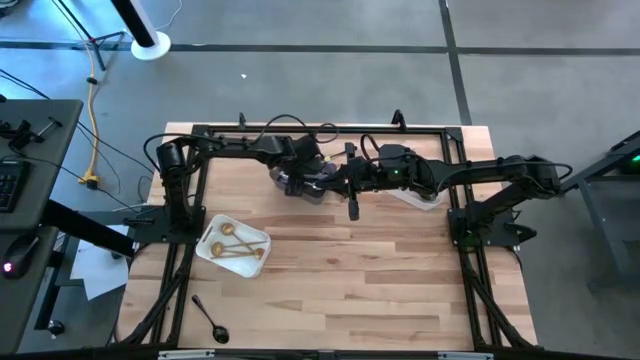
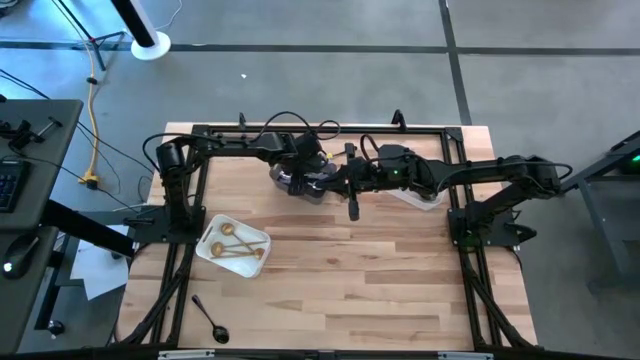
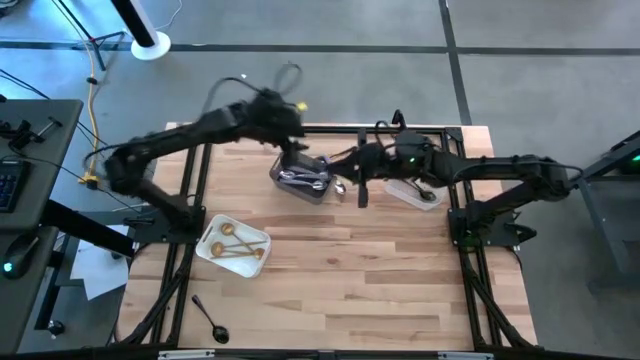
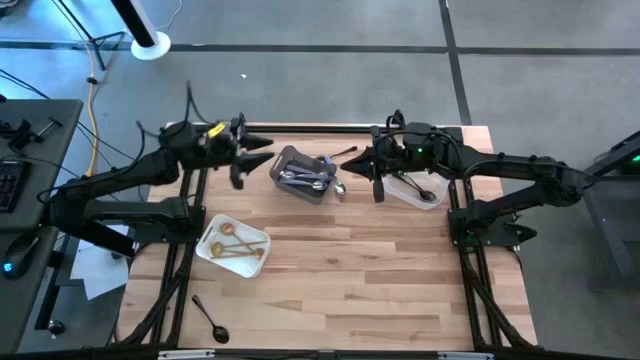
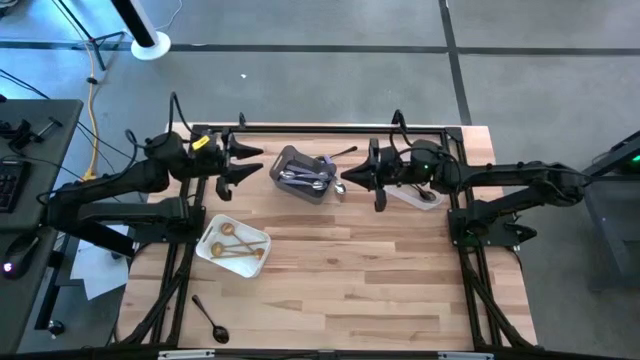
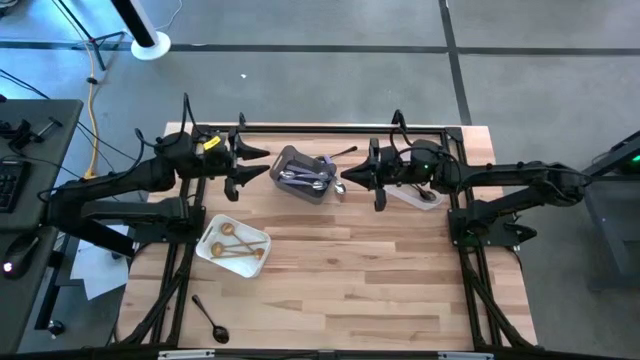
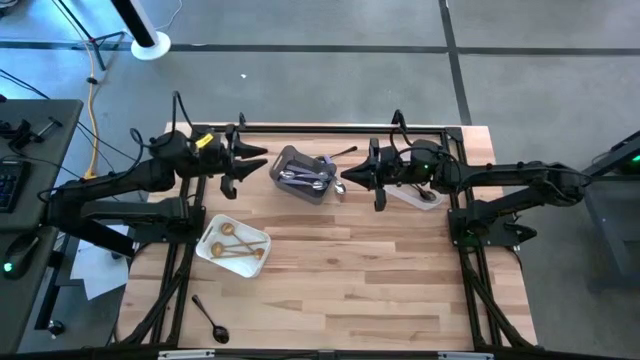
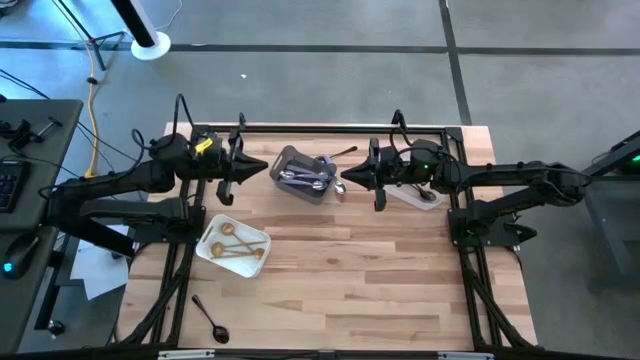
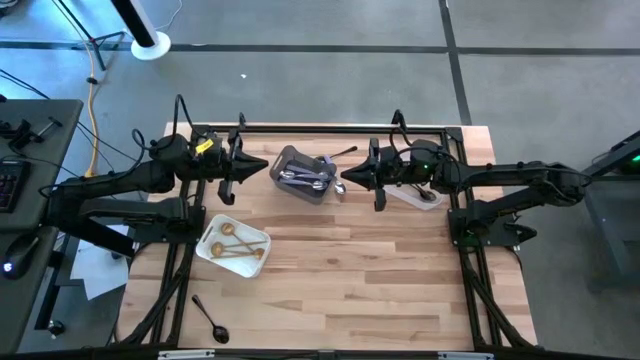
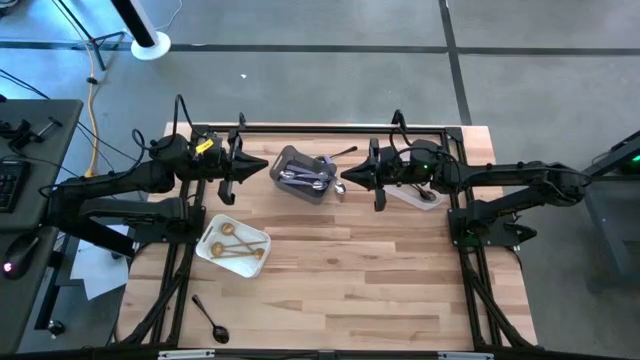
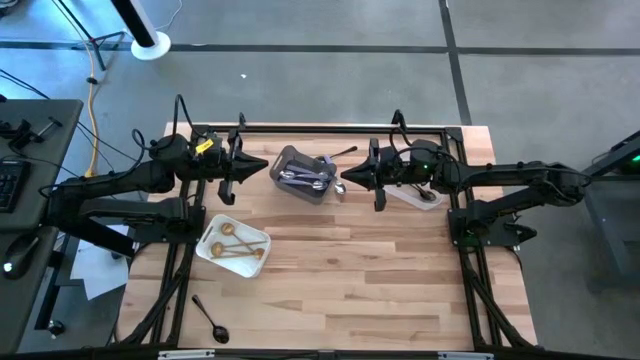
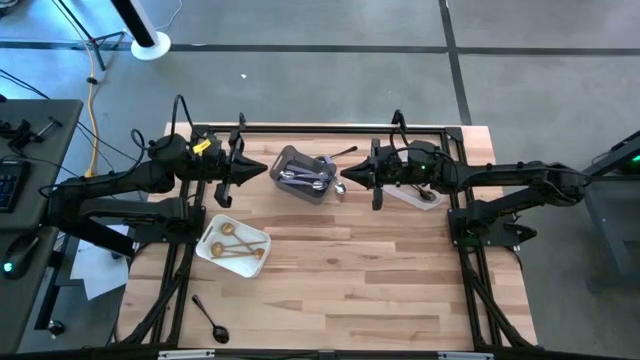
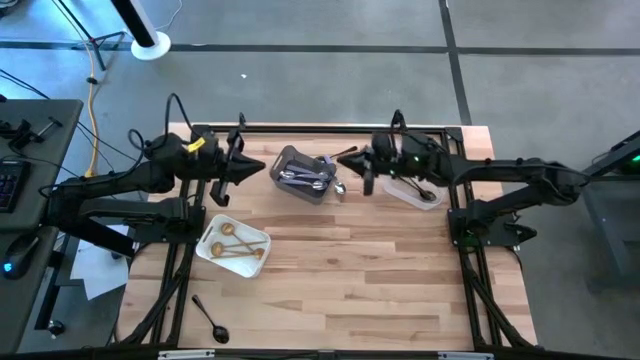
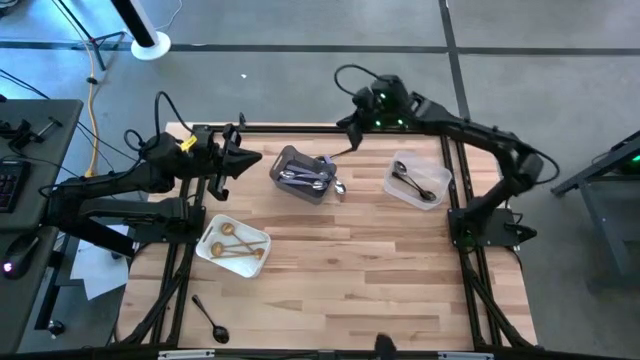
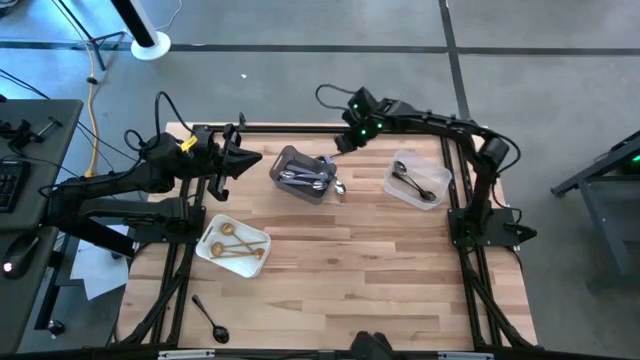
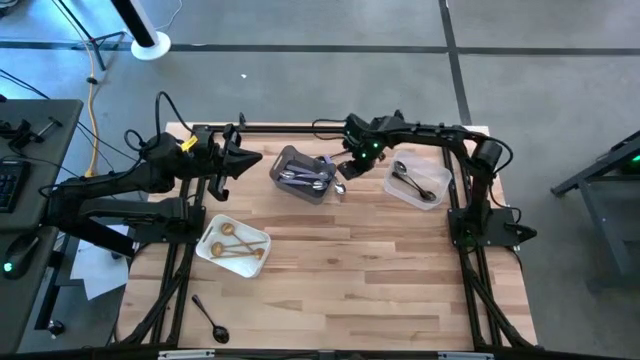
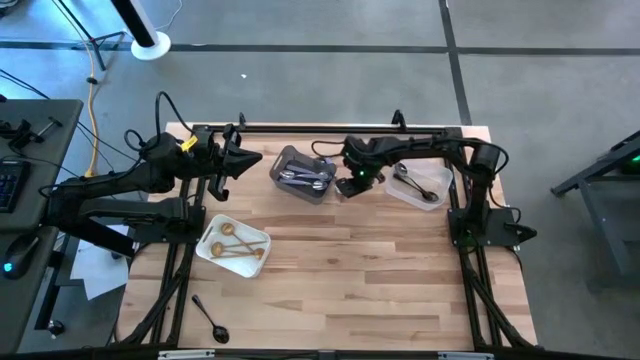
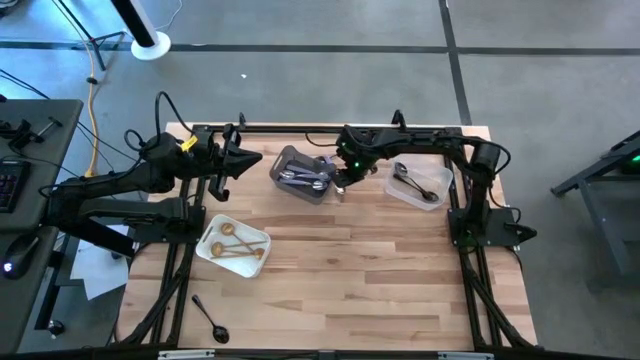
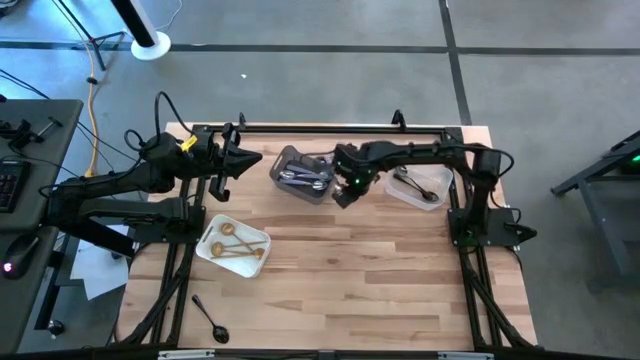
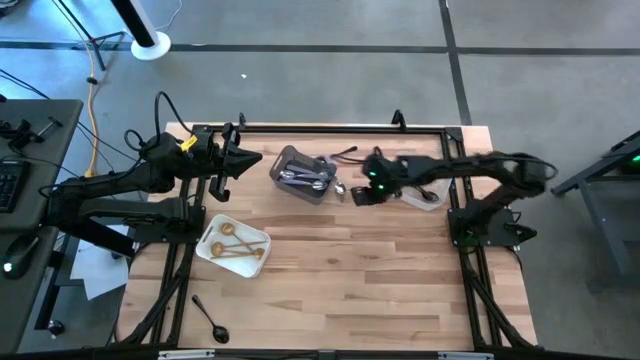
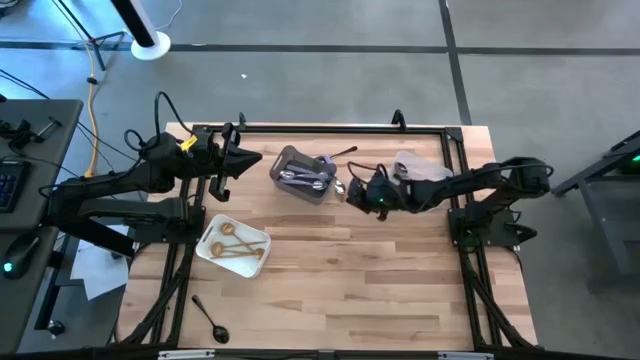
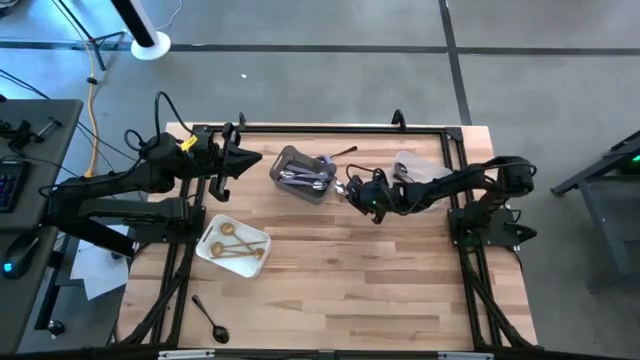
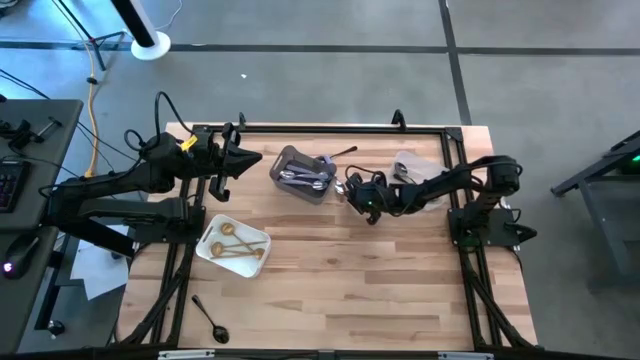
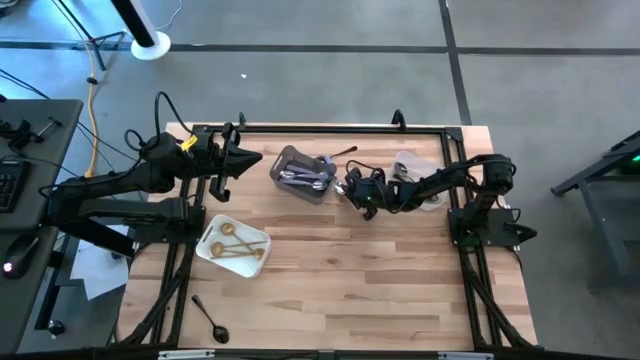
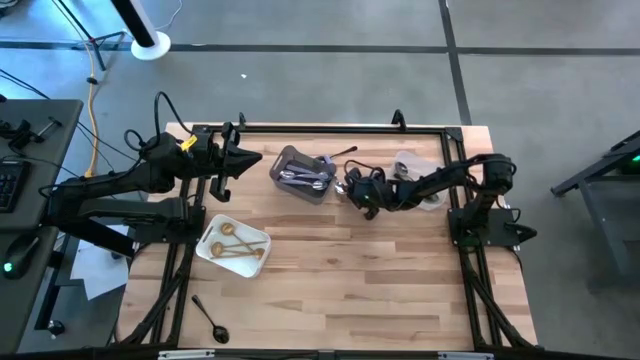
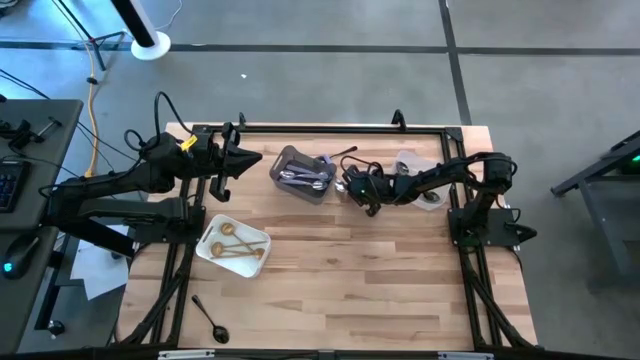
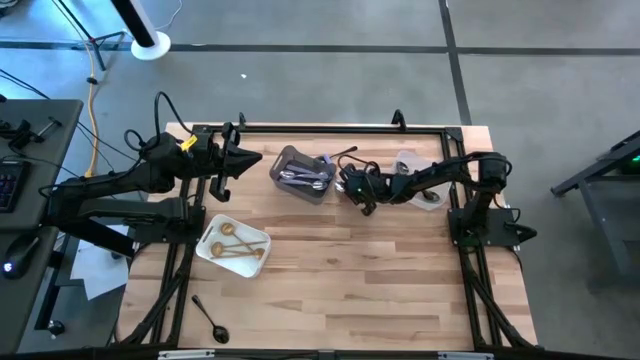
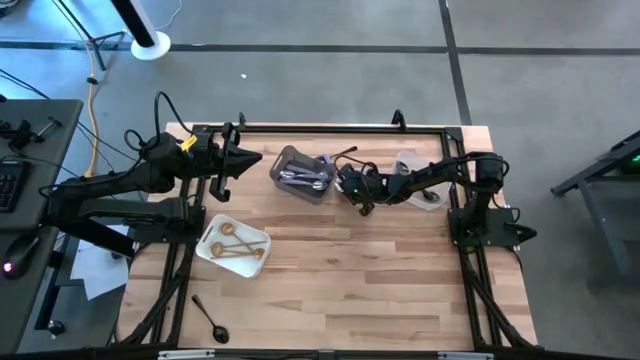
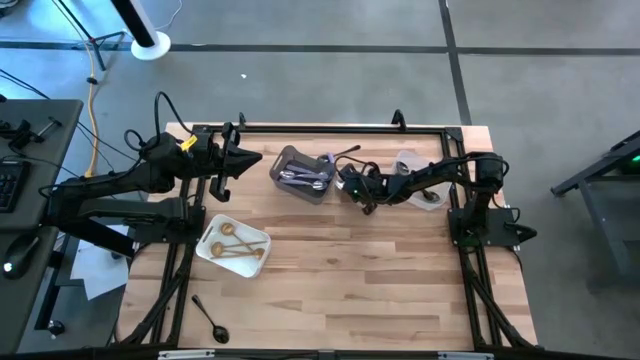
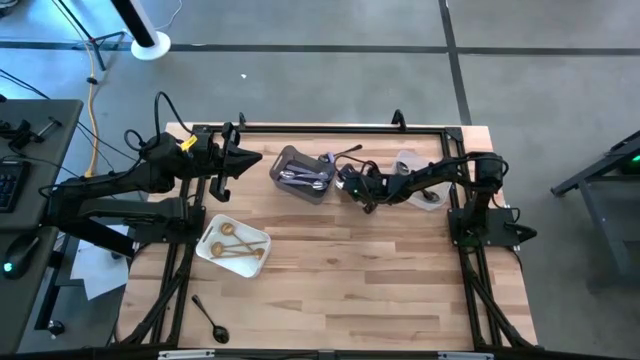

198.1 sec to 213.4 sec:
Task: Sort silverware by color (type)
Put the purple spoon into the black bin

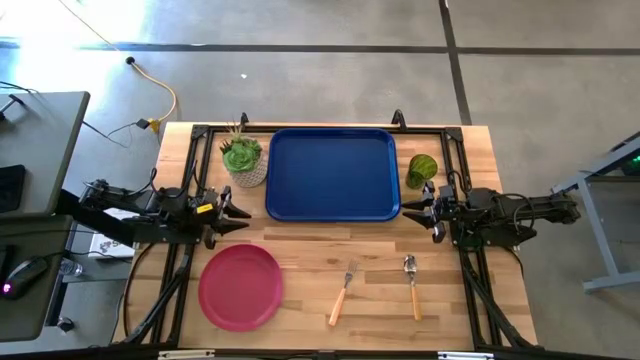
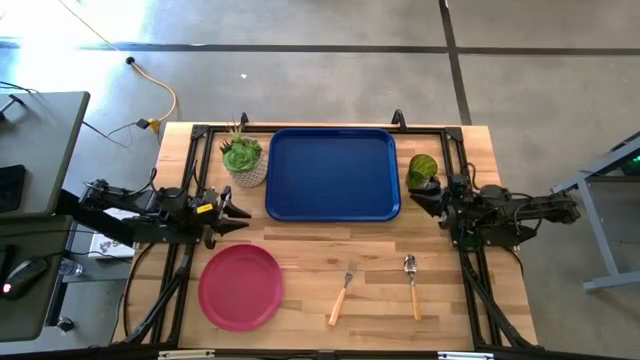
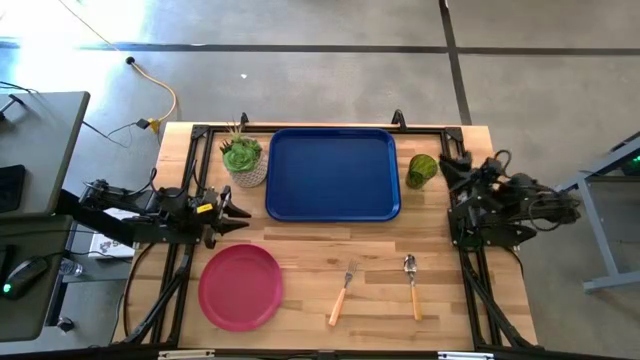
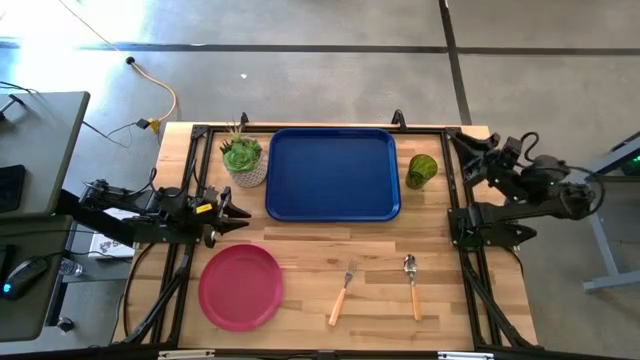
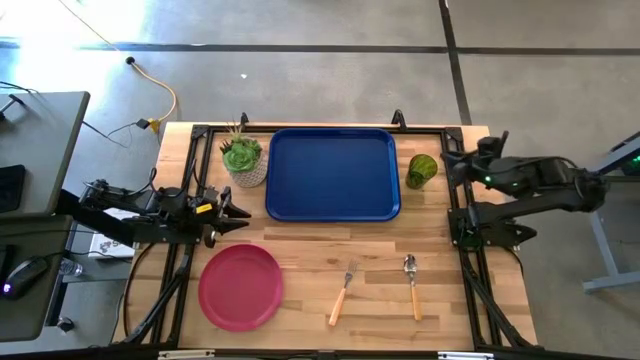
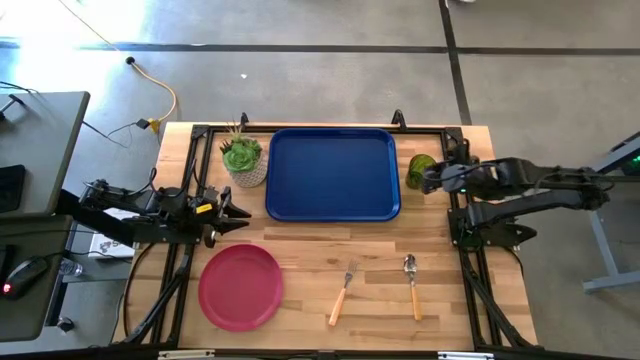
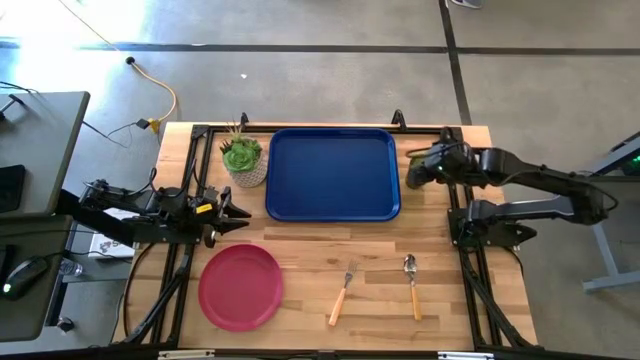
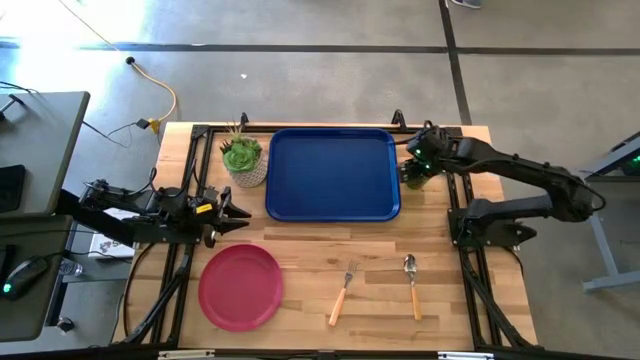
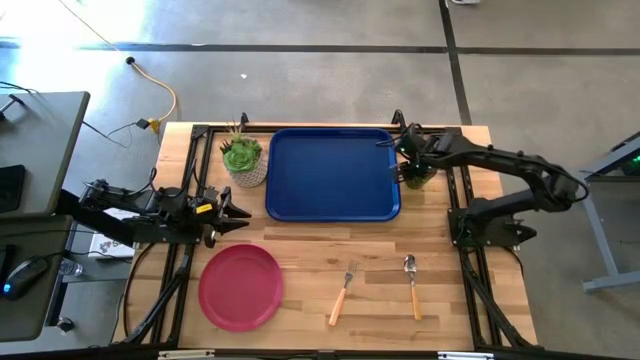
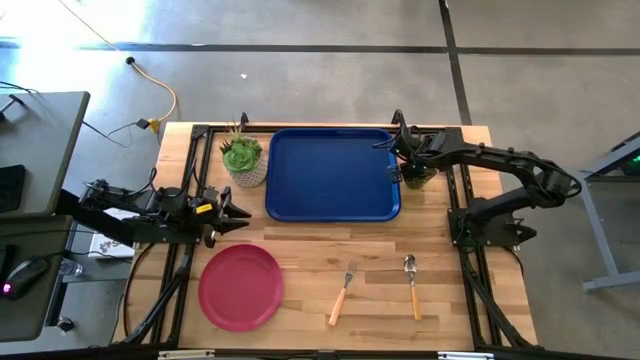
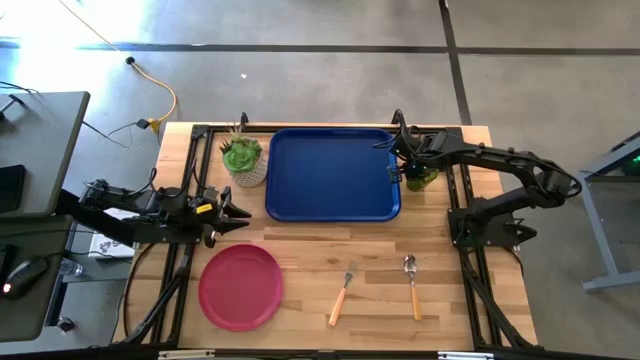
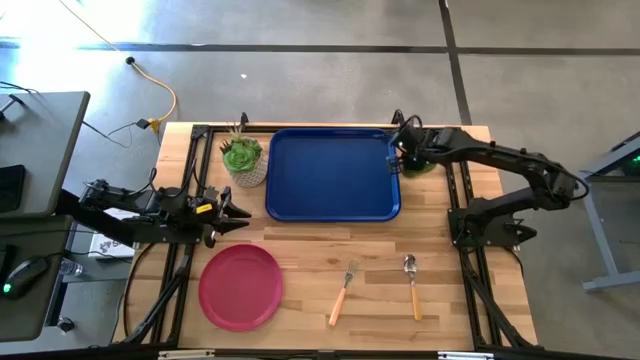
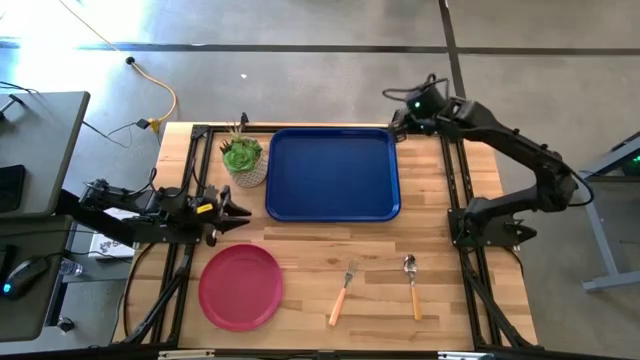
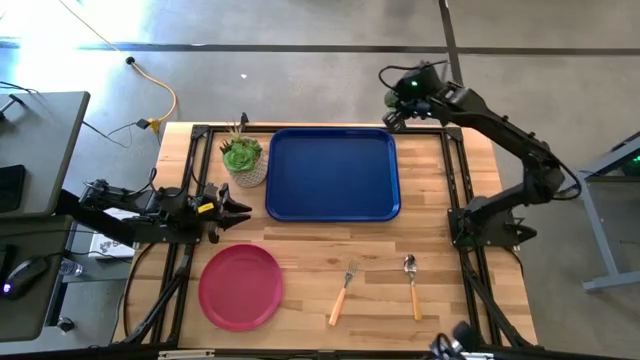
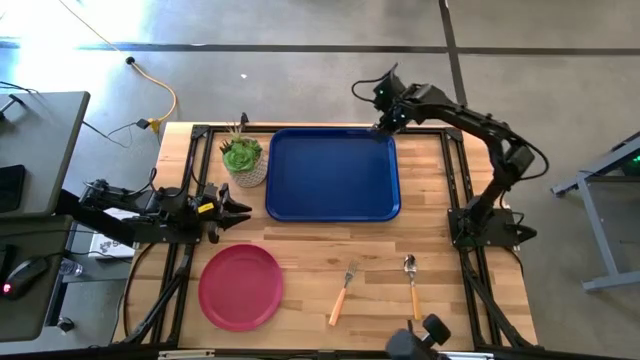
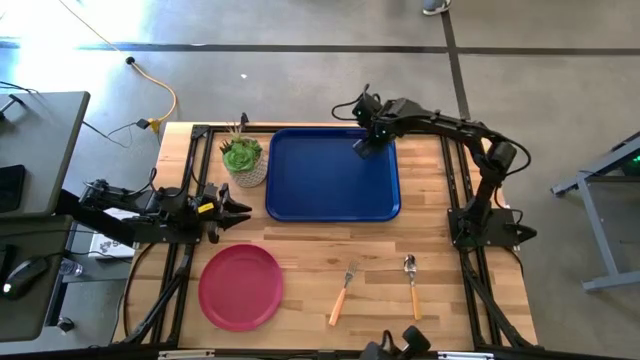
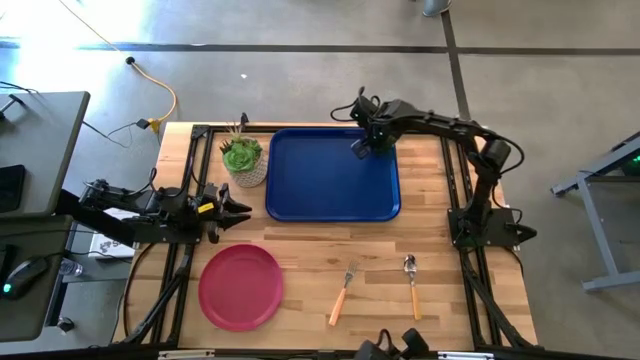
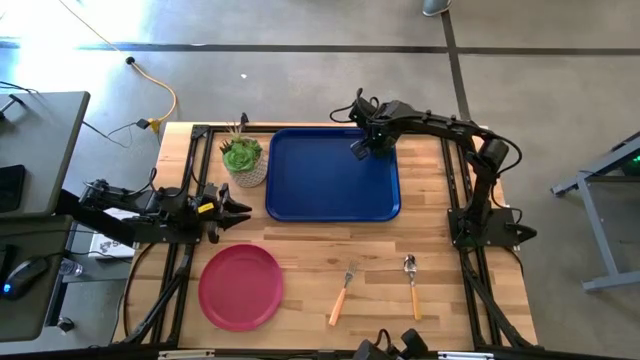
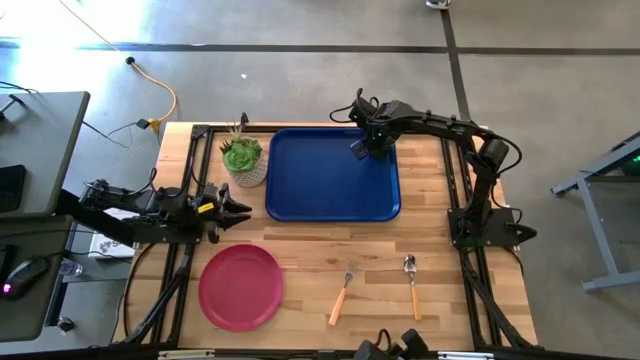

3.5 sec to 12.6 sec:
Task: Pick and place plate/cup/fork/spoon on tray
Put the green cup on the top right of the blue serving tray
